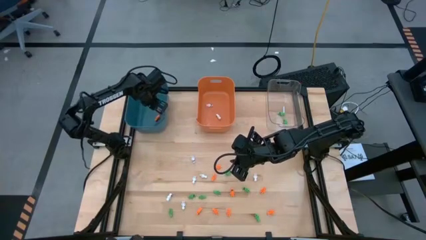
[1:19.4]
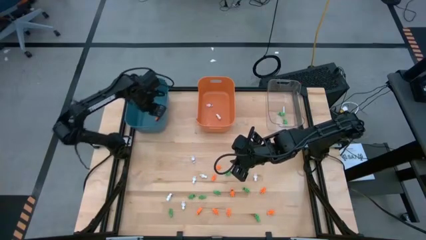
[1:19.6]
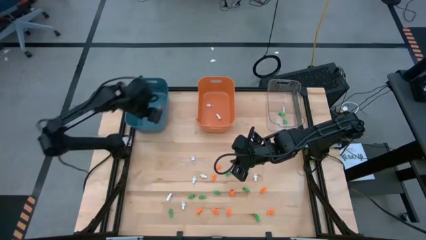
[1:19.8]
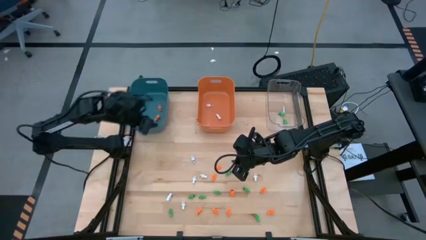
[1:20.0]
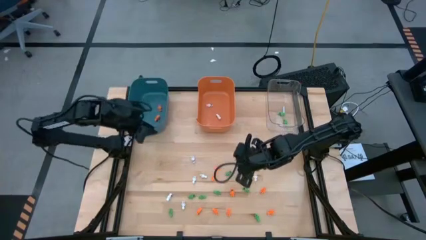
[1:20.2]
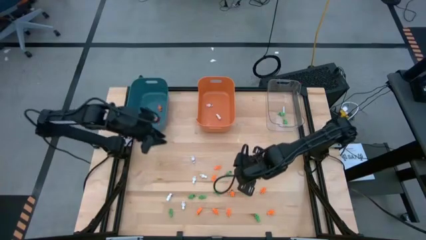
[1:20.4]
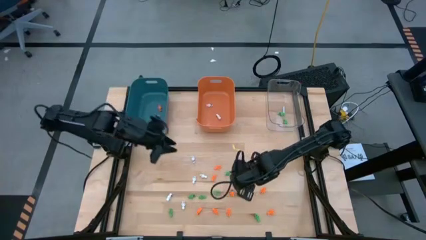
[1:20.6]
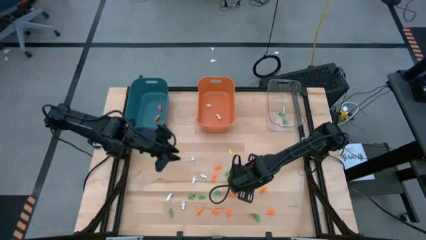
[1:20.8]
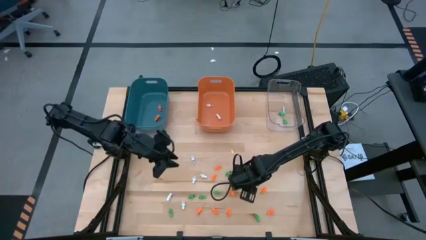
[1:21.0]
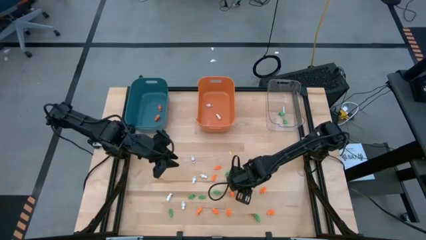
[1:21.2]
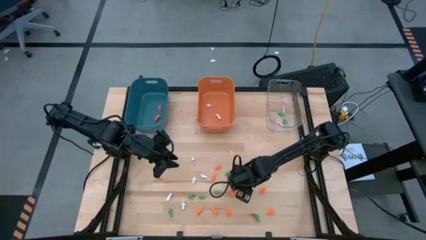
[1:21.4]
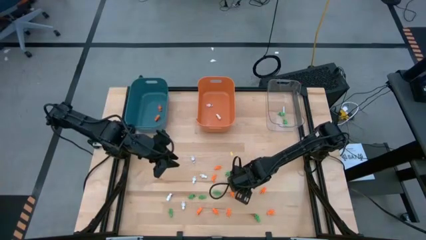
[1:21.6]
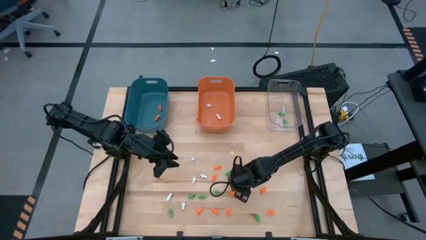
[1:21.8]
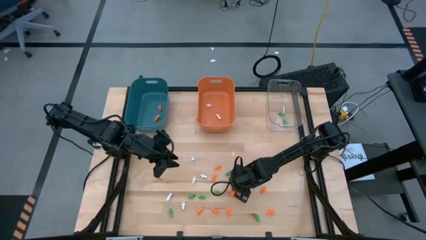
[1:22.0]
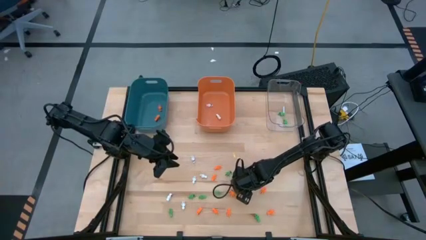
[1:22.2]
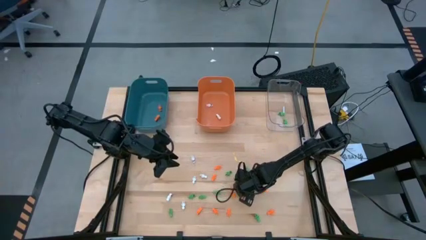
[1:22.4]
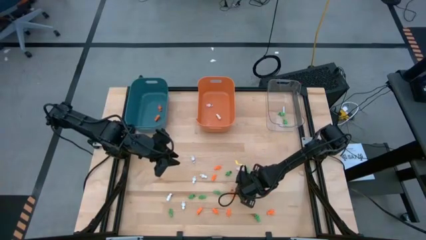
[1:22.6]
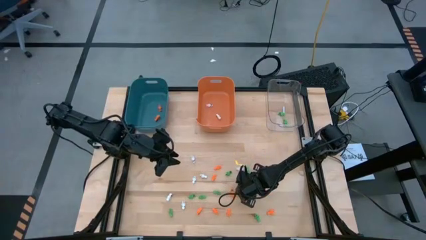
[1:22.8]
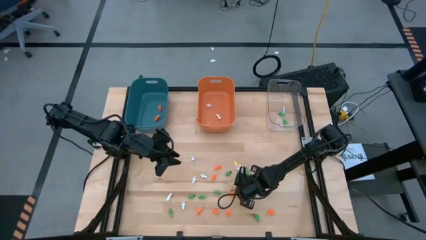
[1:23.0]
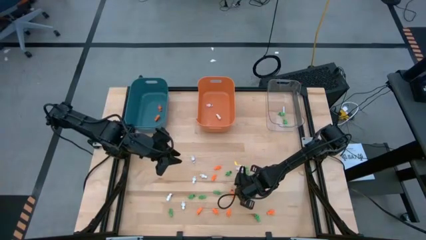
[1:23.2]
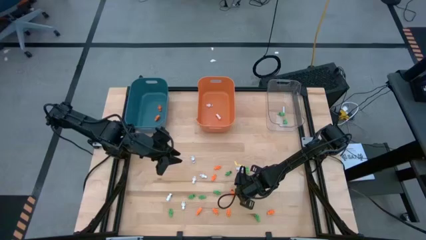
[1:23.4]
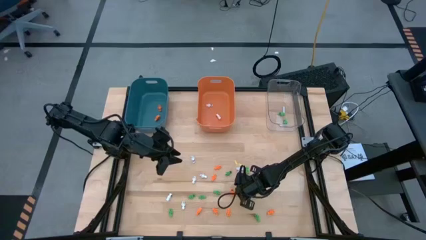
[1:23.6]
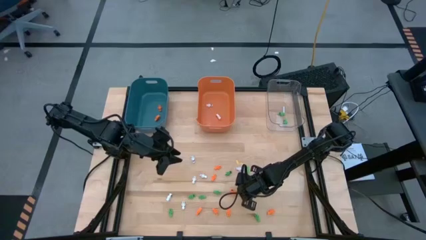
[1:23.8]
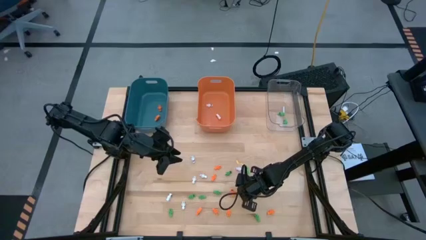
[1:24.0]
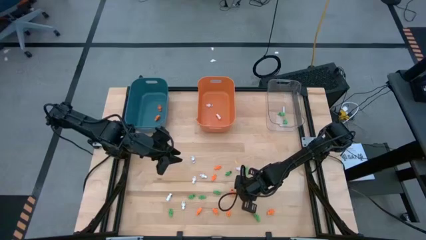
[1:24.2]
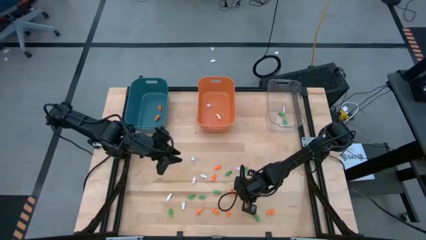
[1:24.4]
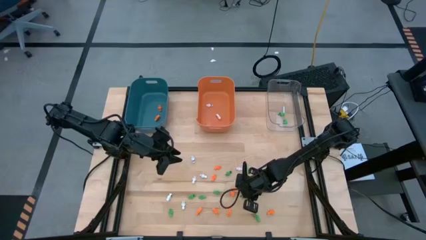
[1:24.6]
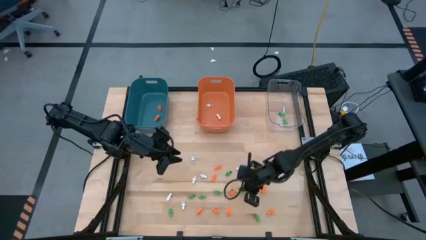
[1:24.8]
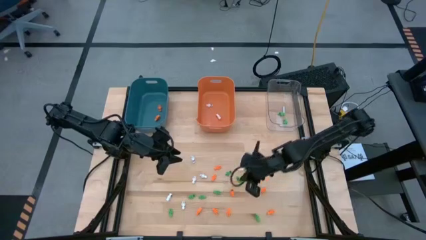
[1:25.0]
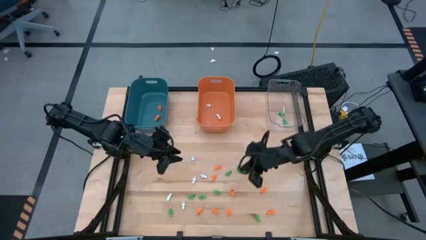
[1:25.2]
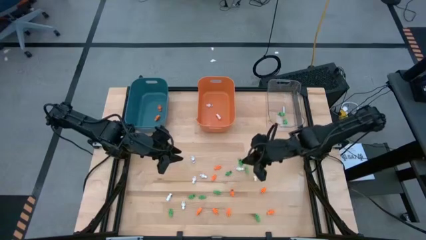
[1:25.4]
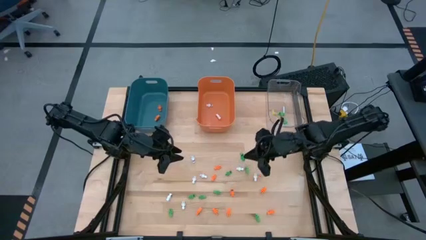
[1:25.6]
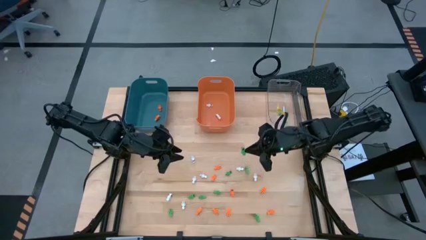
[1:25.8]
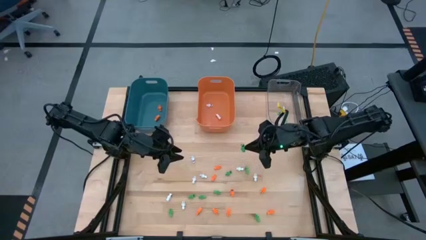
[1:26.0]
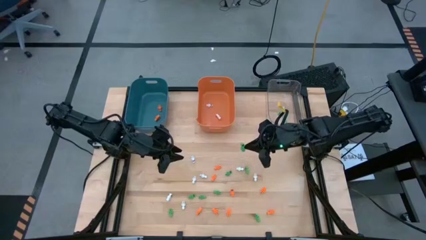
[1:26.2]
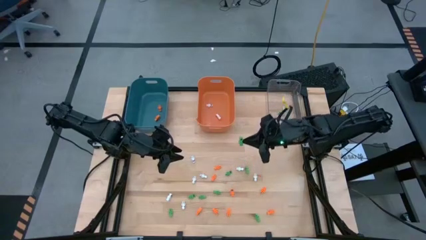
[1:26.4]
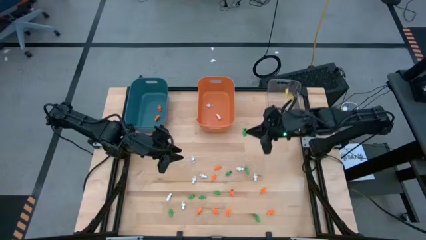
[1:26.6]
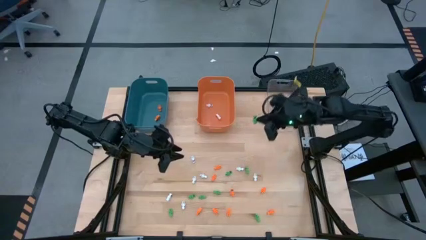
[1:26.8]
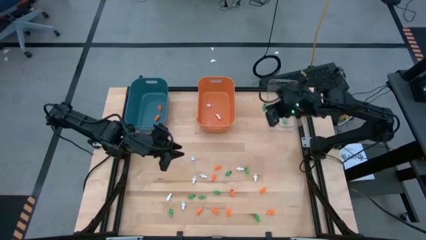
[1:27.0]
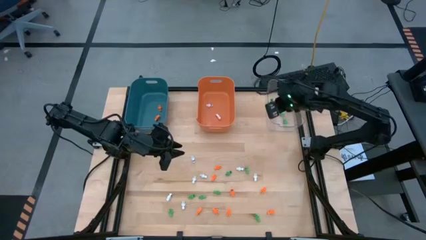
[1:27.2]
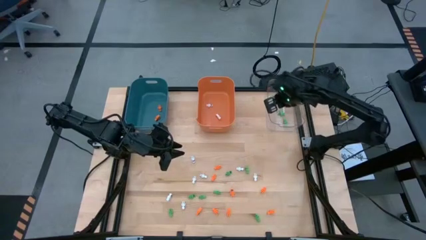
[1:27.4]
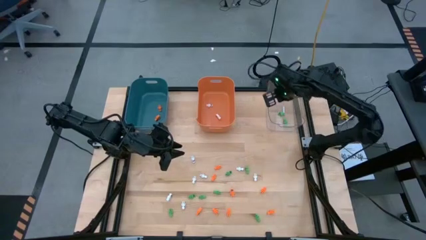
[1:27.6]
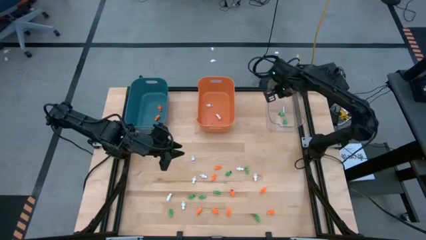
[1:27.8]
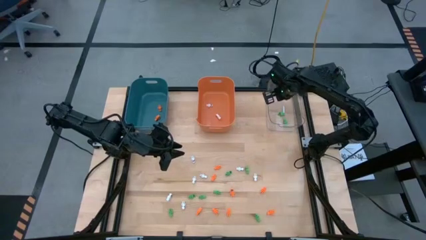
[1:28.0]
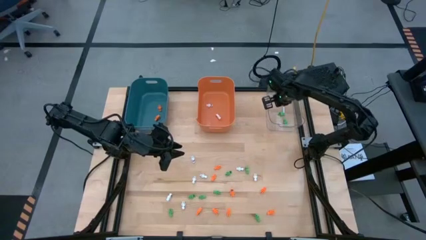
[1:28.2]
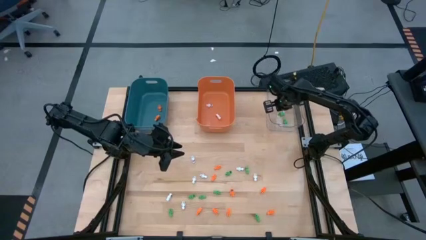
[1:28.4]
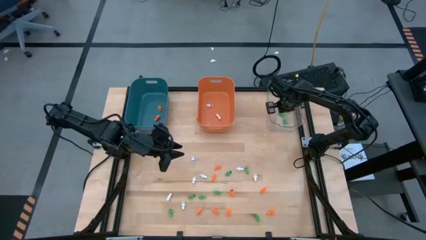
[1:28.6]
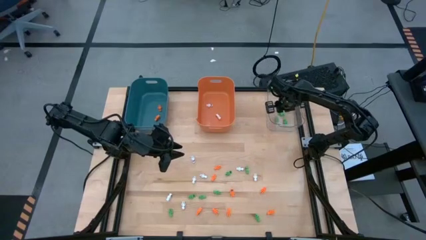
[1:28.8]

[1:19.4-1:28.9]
Task: Sort Halloween decoration
Put the green skeleton toy into the transparent bin

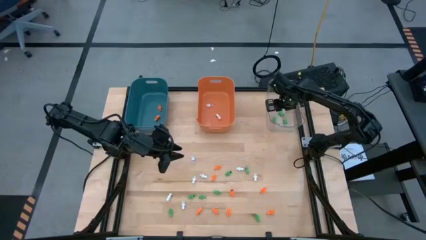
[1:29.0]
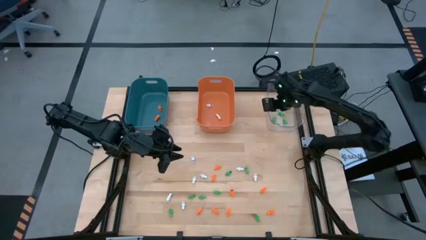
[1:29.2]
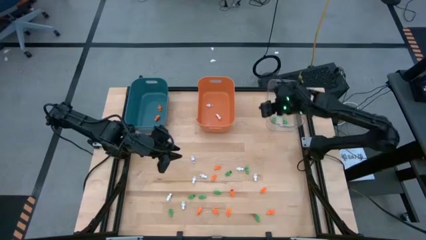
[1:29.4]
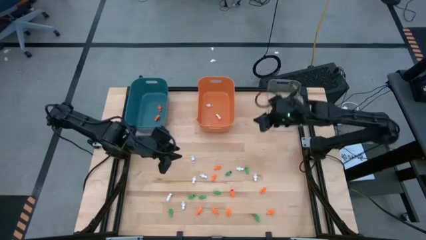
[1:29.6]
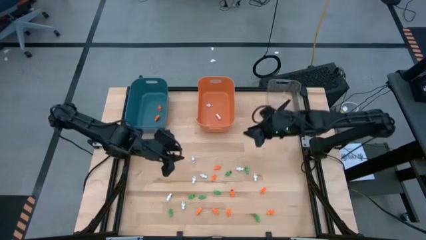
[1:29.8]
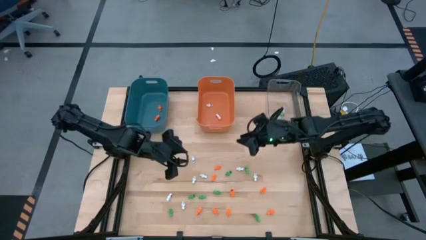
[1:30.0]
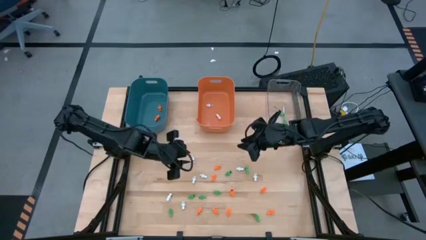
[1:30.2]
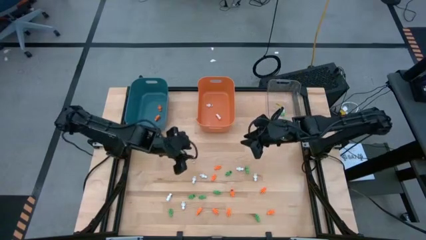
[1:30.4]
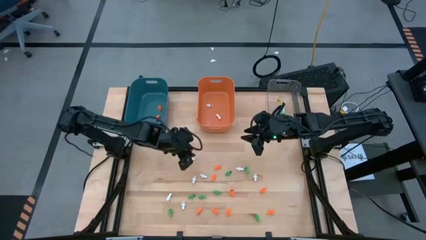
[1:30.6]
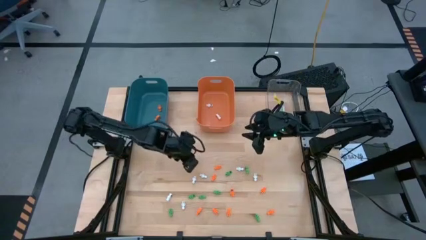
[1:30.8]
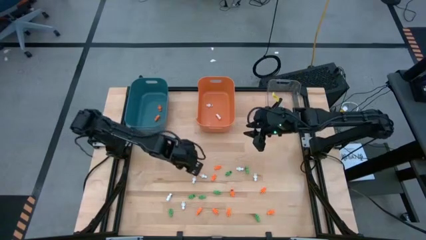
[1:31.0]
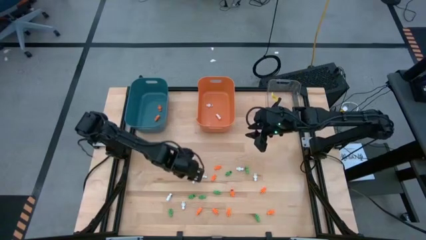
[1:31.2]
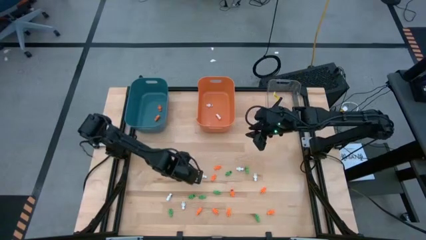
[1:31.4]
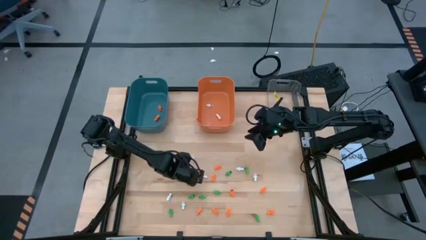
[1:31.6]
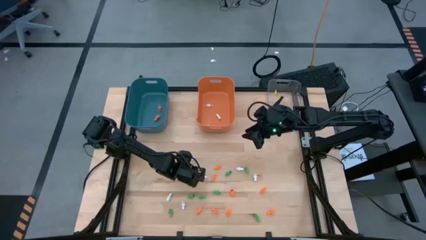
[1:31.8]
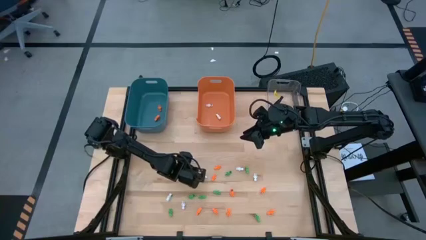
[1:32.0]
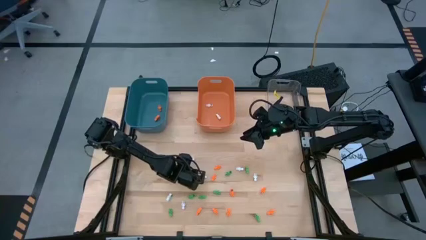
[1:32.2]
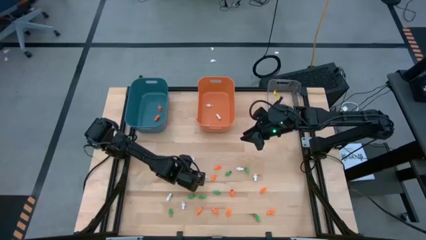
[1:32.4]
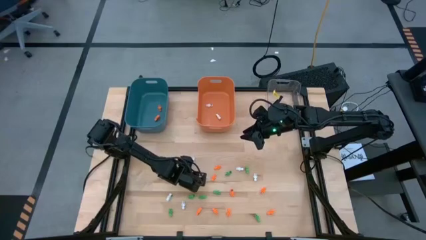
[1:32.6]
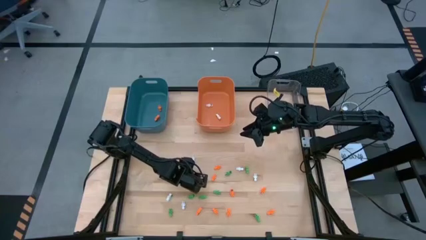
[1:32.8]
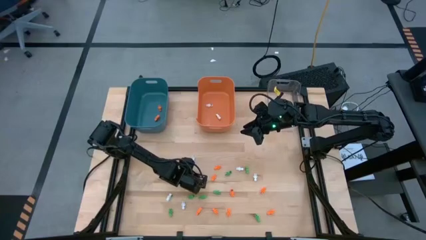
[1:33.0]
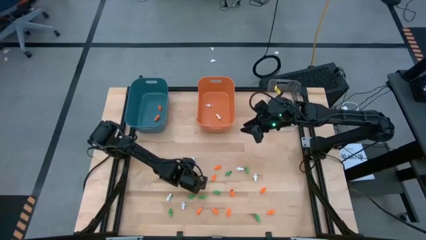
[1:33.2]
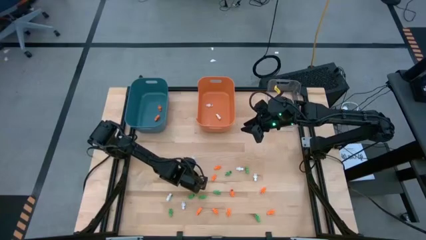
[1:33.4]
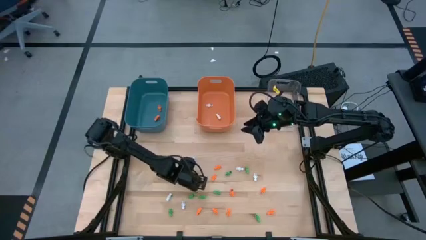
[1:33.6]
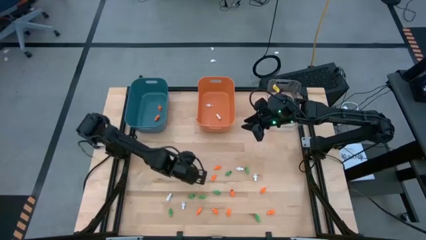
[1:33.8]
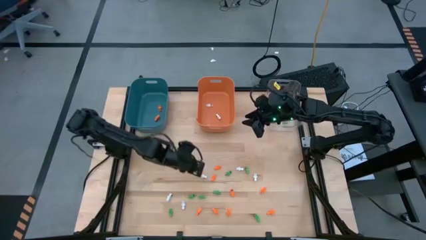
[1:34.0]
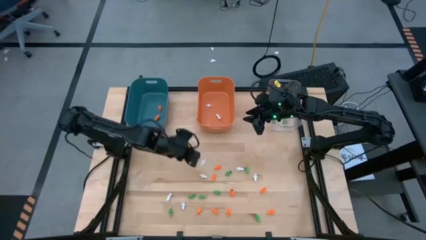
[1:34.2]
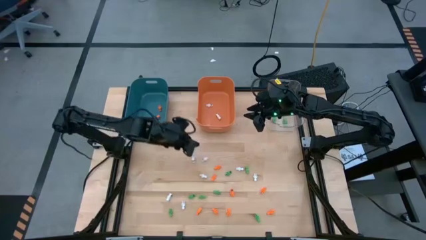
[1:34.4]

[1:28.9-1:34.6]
Put the white skeleton toy into the orange bin
